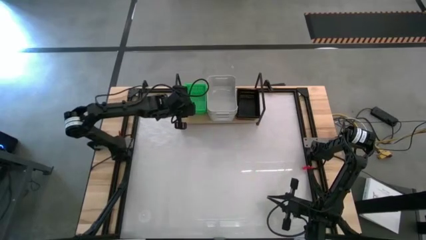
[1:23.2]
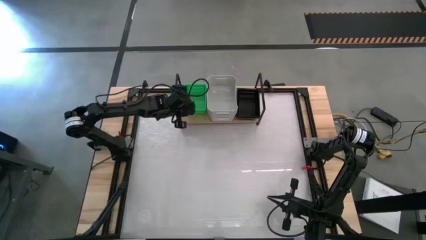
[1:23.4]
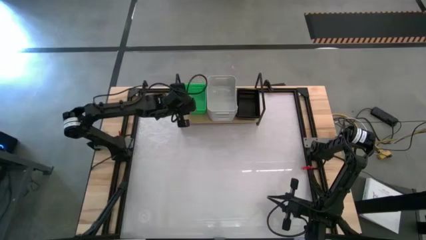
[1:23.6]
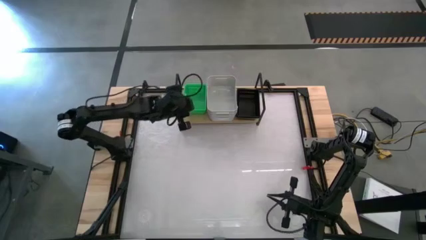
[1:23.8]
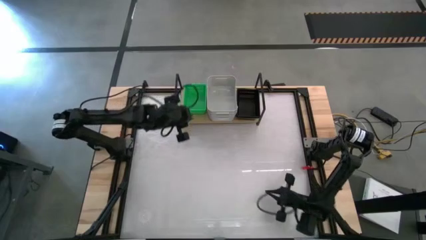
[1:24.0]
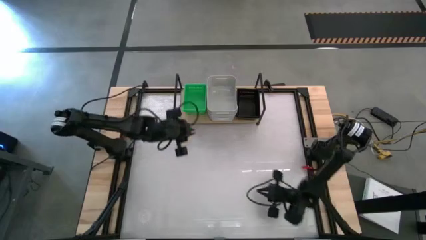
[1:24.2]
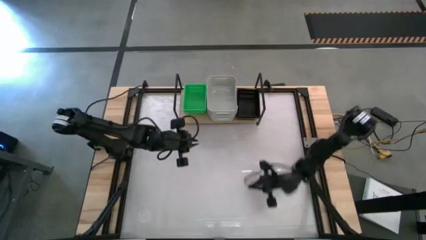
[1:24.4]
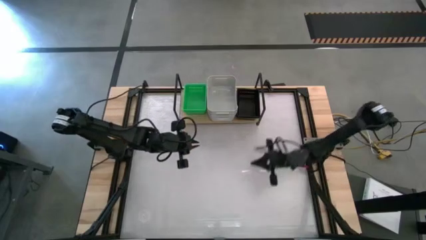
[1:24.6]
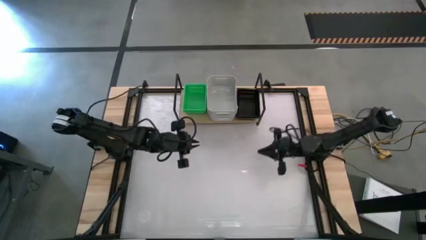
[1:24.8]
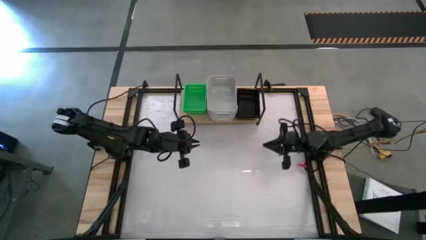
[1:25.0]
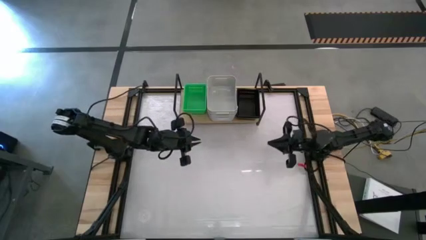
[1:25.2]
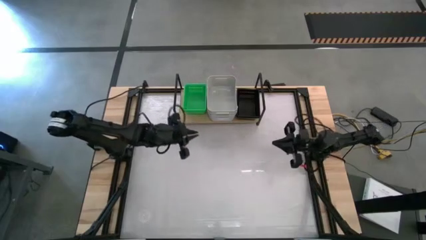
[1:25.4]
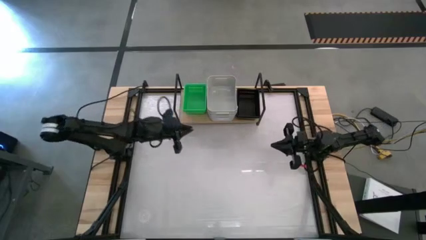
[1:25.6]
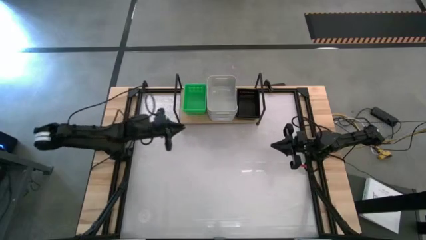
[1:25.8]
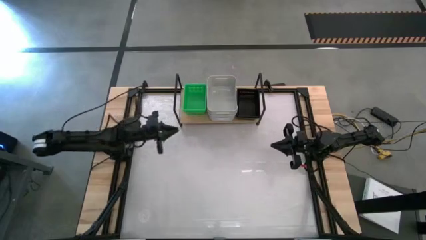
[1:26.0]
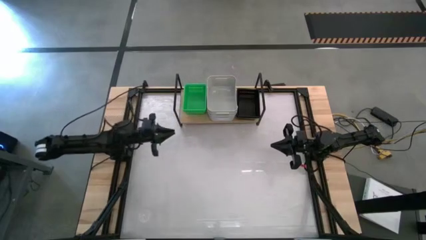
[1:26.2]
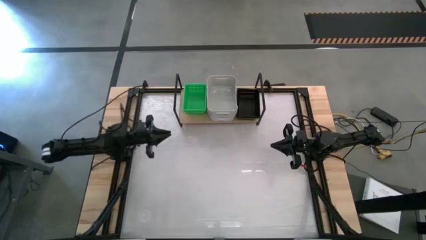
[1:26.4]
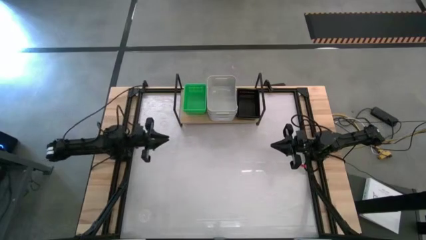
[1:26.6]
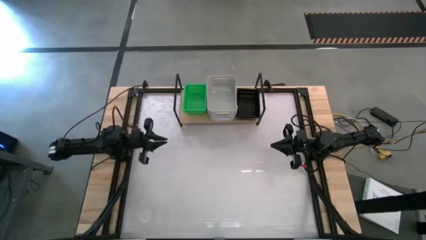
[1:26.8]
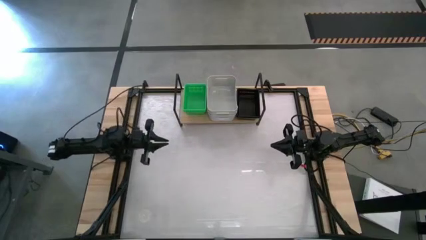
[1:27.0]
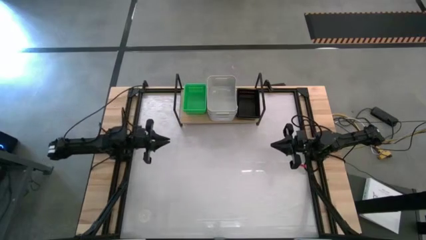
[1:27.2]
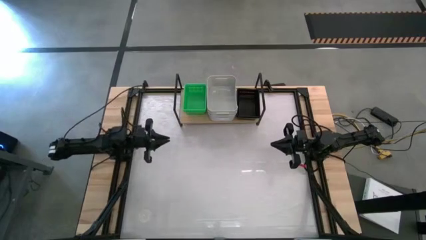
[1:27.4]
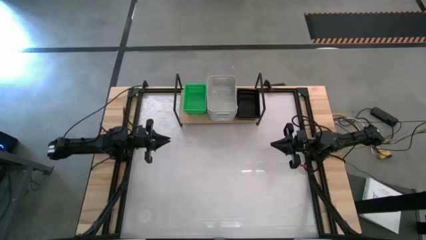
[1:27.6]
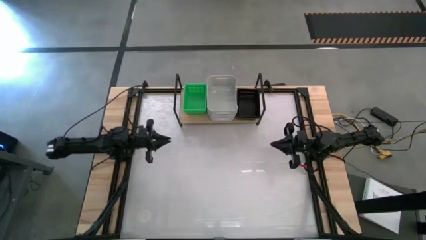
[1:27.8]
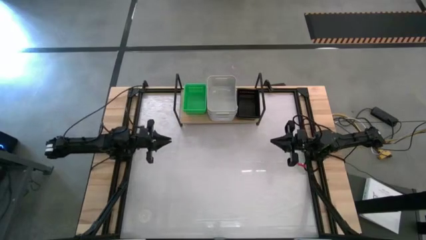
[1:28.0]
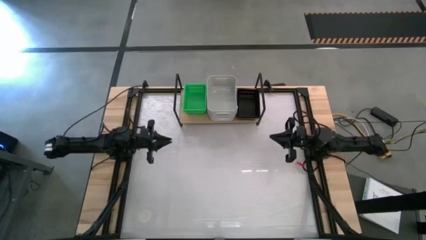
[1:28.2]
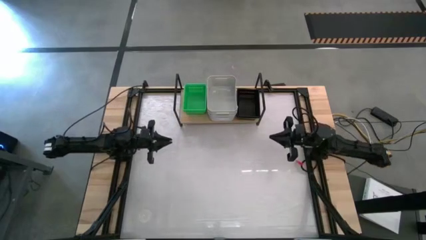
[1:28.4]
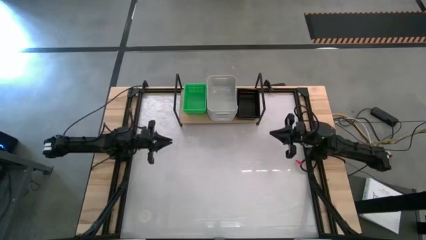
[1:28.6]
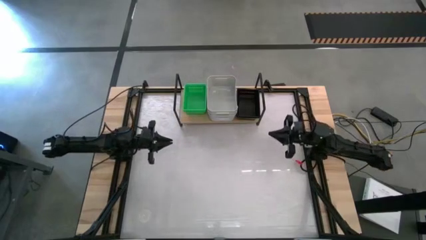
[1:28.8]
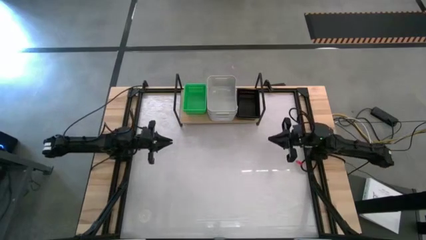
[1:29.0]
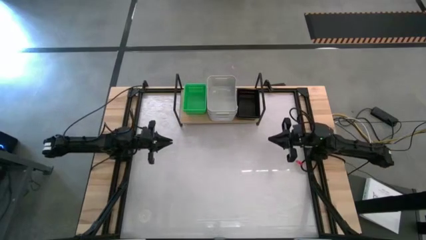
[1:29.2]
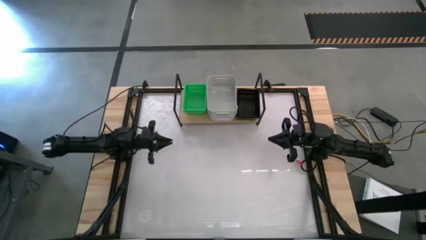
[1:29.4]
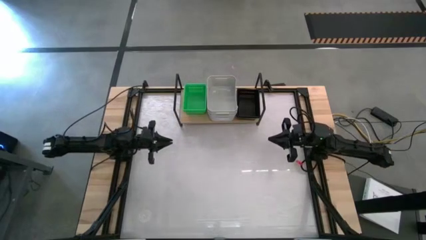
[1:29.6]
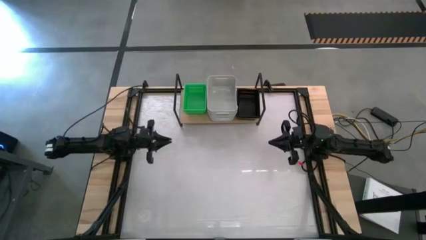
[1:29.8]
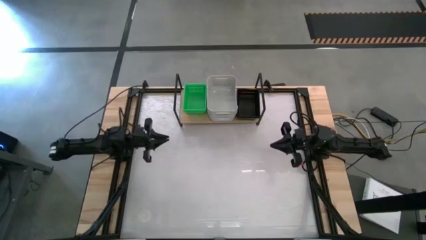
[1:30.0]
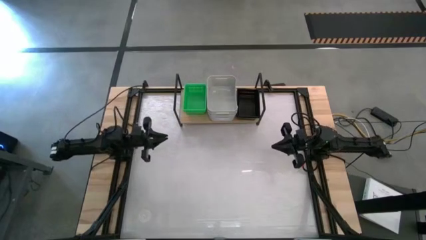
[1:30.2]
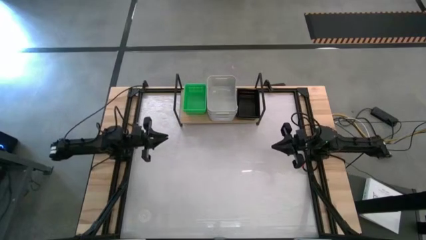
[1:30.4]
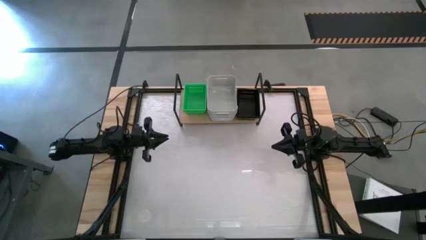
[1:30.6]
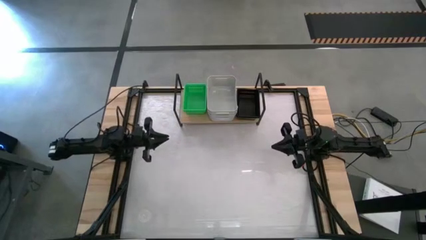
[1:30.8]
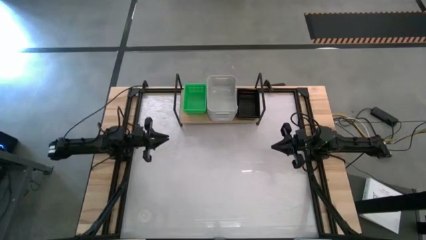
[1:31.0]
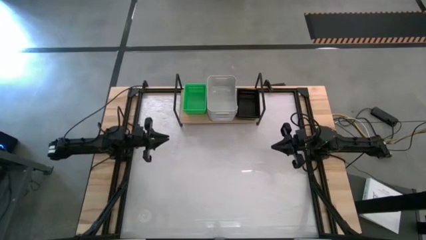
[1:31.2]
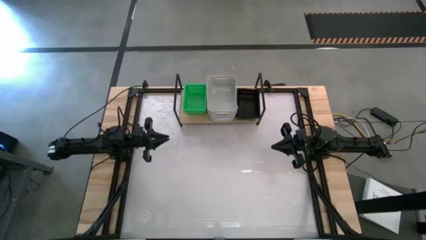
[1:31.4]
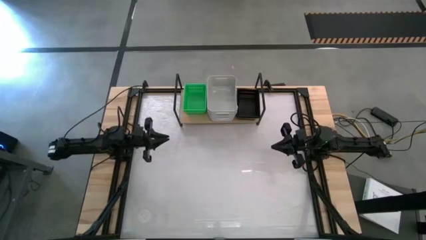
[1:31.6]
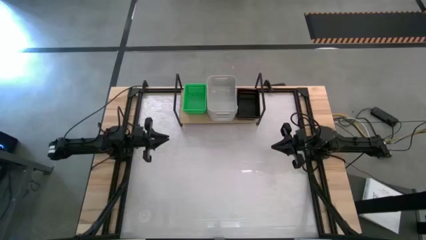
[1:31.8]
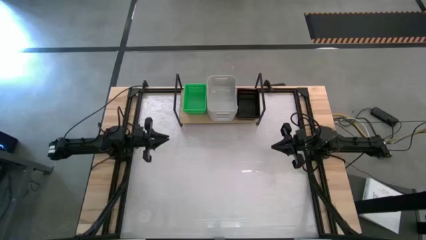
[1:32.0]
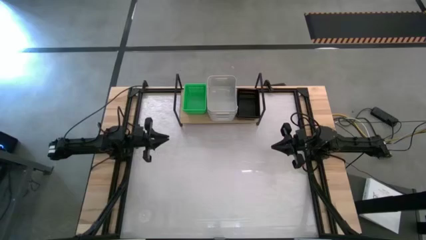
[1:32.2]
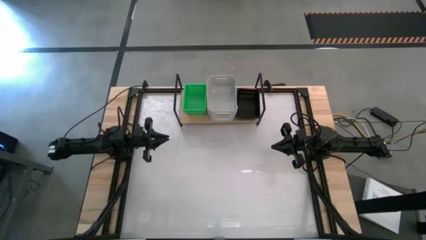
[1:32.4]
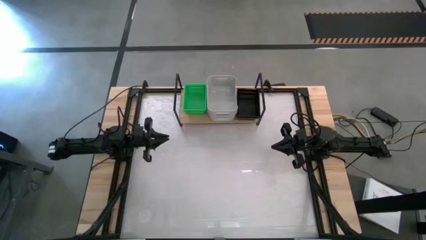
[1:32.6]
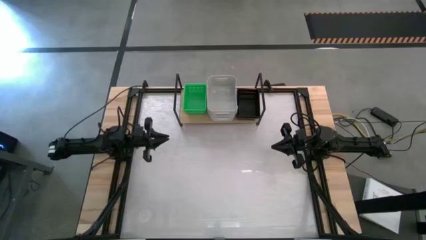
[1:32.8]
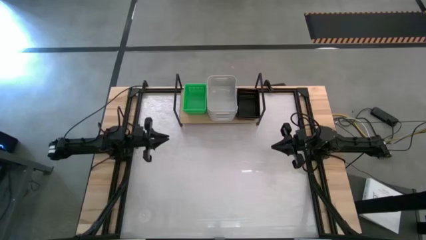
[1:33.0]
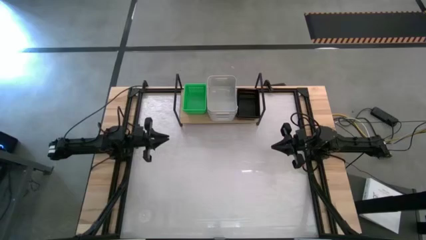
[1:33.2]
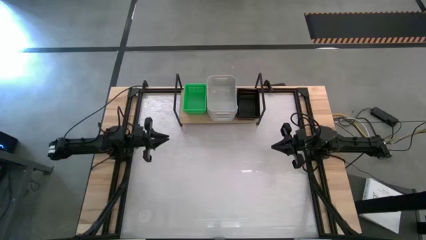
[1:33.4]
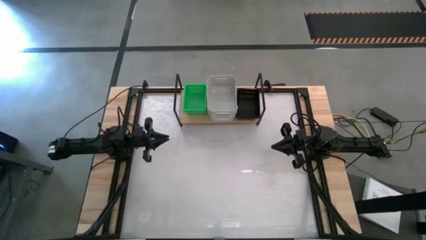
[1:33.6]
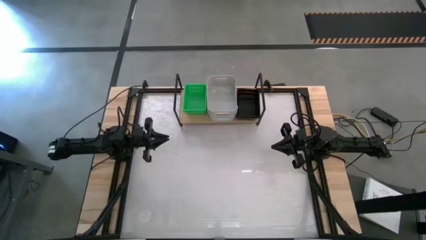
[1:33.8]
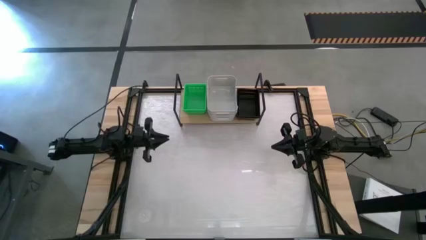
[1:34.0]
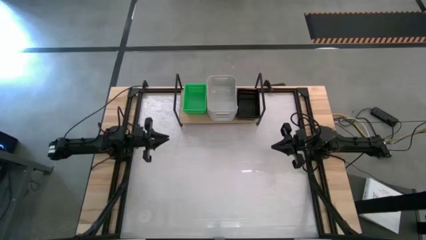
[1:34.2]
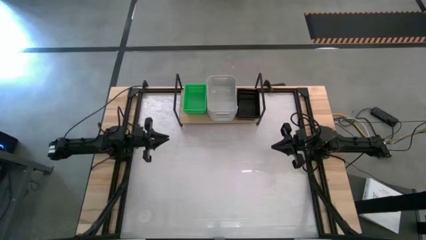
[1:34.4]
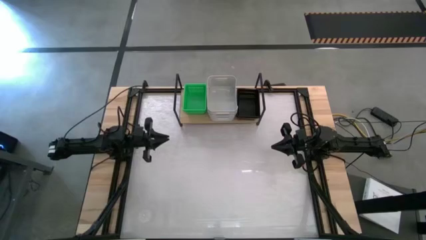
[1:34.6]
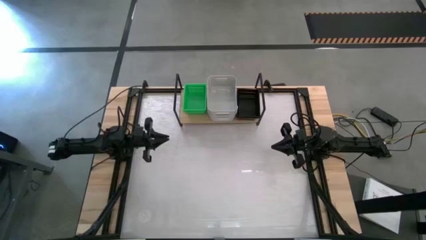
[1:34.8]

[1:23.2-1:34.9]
Task: Stack baskets on shelf by color
Return to Home Position

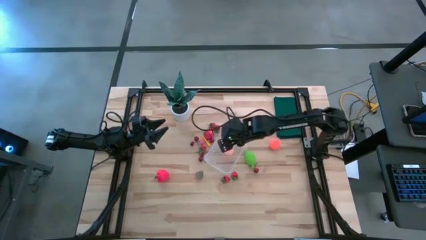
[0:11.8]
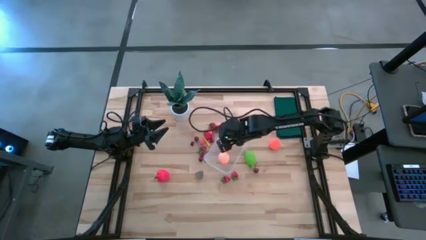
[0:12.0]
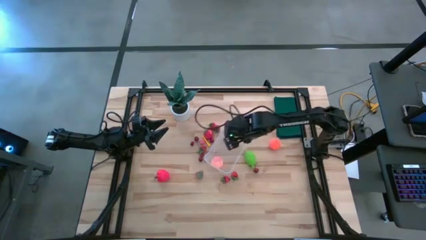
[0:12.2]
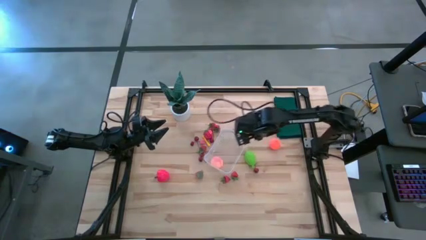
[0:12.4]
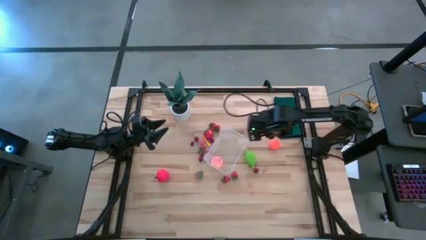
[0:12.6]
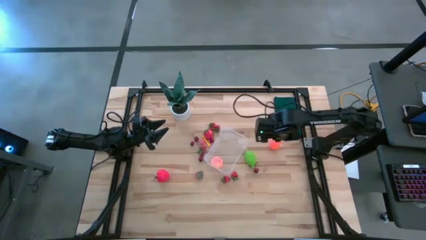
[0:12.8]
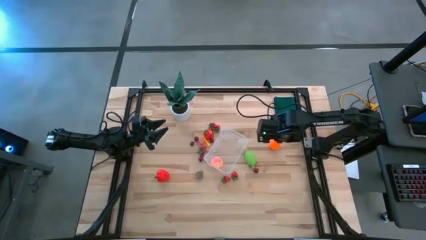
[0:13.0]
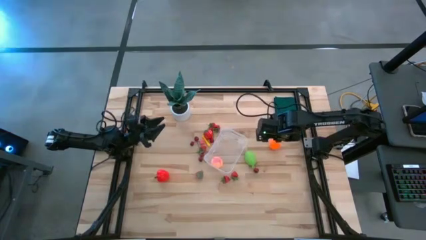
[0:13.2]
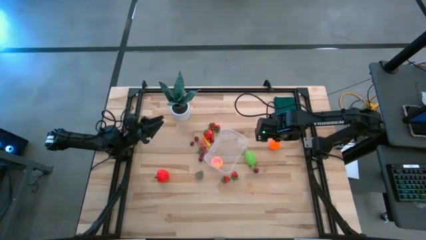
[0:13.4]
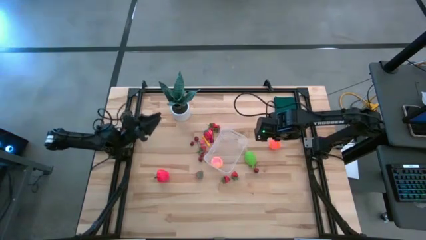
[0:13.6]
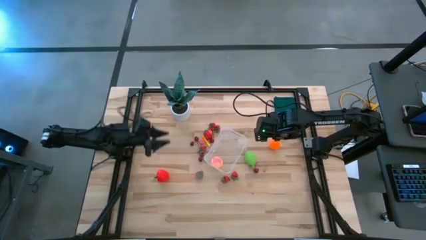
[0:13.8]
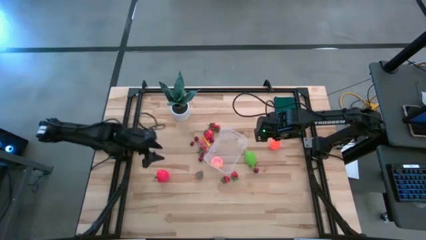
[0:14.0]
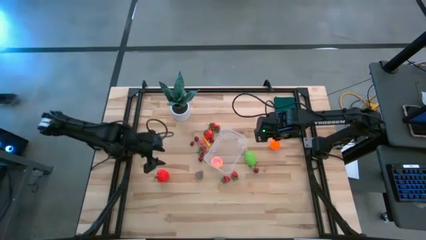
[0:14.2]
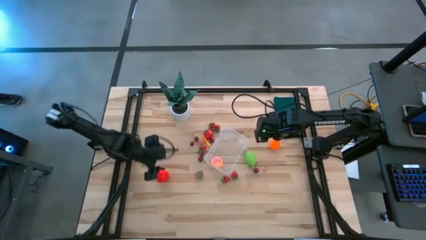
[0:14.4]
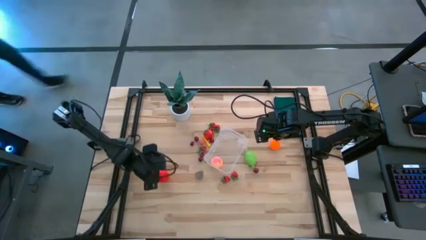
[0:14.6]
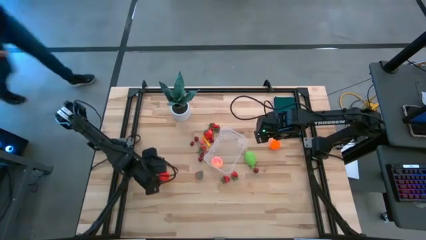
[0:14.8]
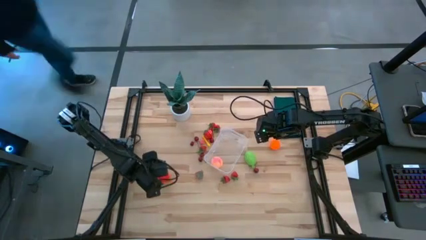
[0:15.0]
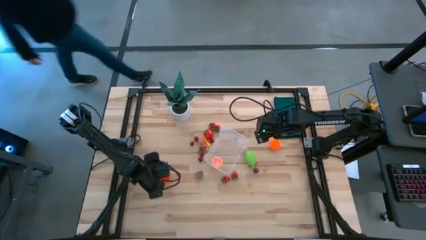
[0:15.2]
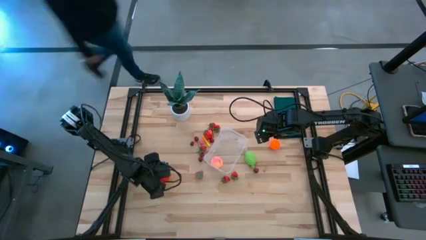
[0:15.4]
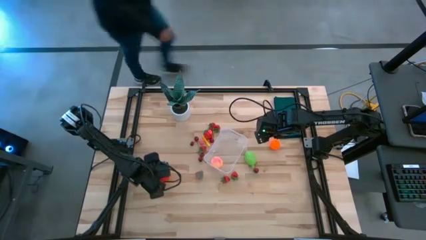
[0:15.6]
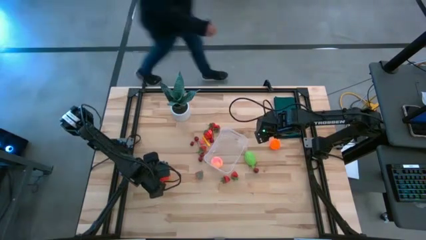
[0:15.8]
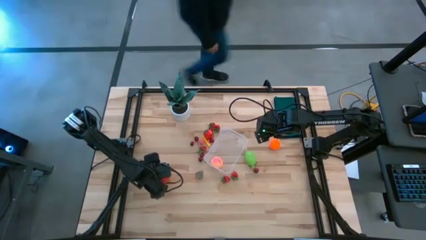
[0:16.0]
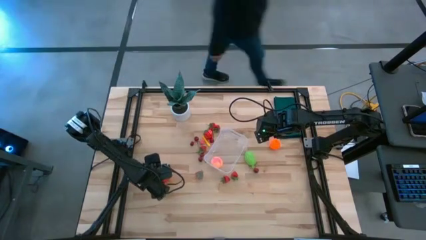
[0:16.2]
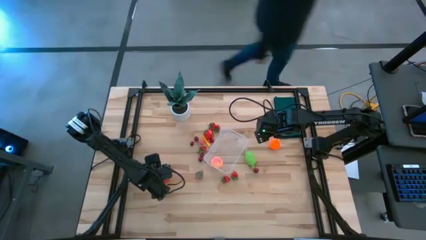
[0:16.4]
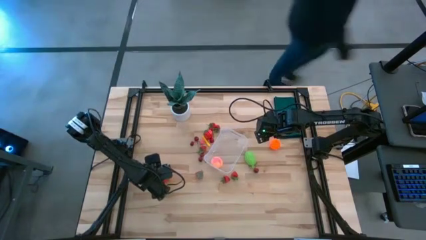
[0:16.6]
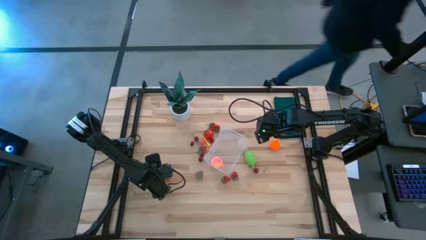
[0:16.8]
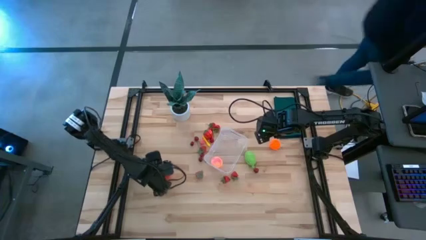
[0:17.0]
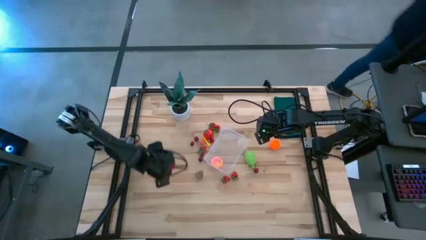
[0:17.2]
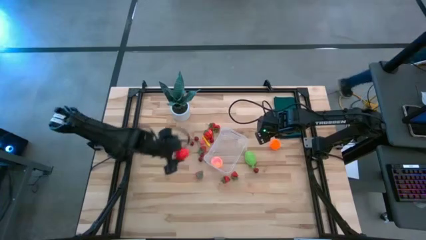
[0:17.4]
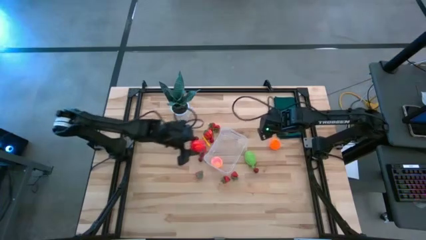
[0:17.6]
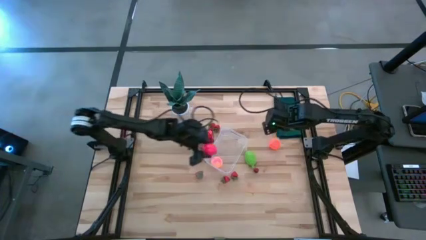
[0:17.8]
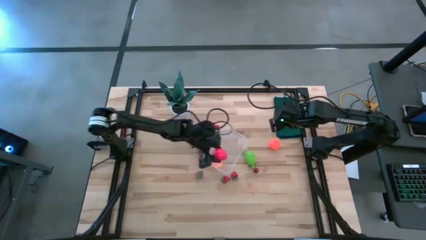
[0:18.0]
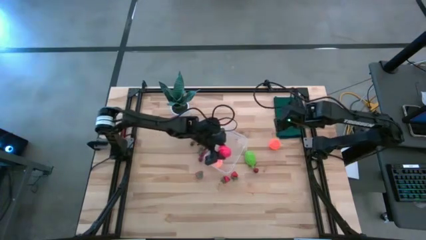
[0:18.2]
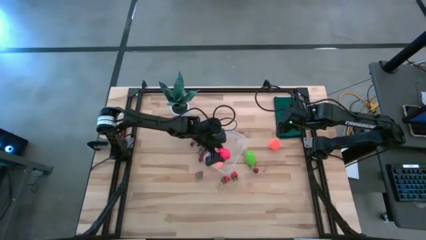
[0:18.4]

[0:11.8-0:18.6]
Task: Pick and placing Produce into tupperware
Put the red apple into the container
